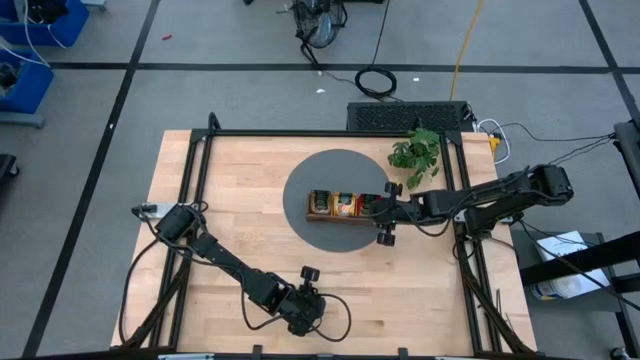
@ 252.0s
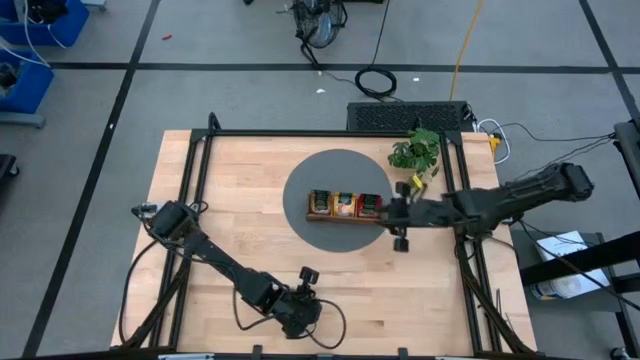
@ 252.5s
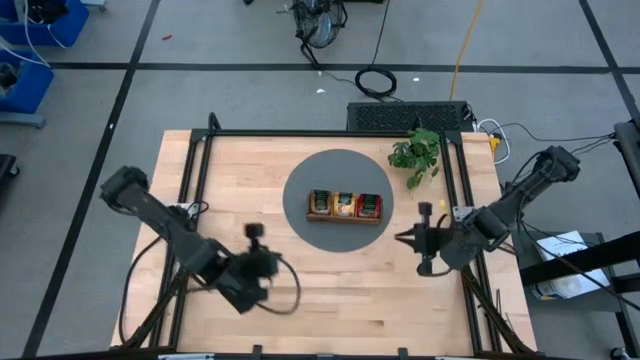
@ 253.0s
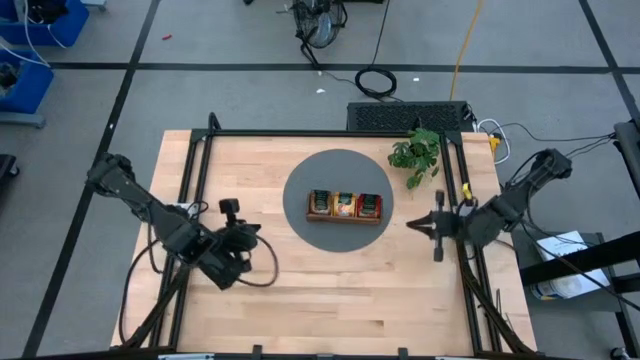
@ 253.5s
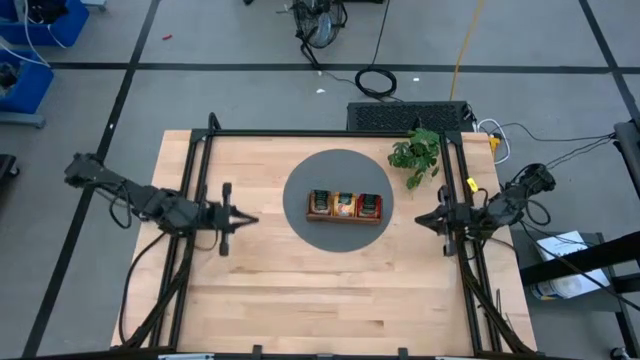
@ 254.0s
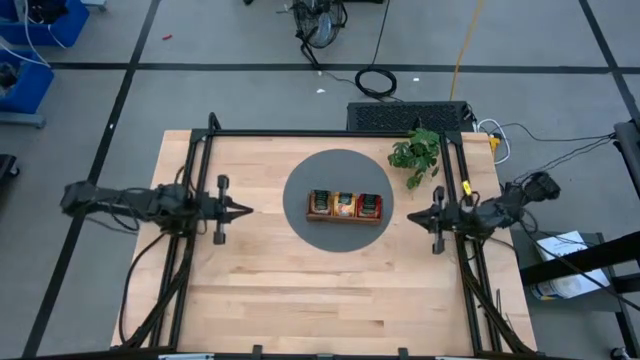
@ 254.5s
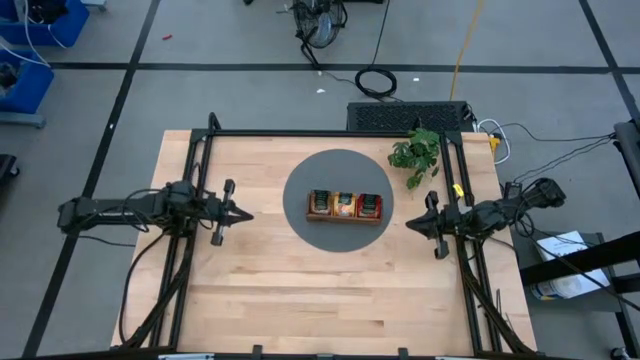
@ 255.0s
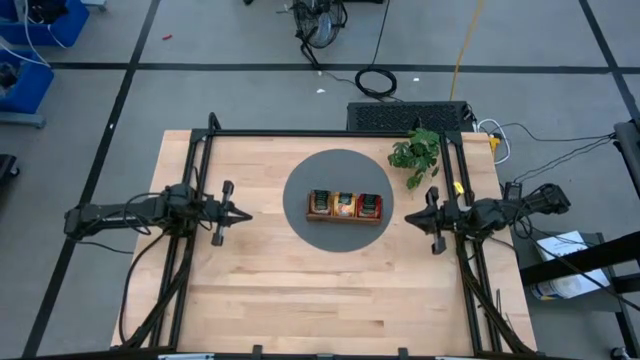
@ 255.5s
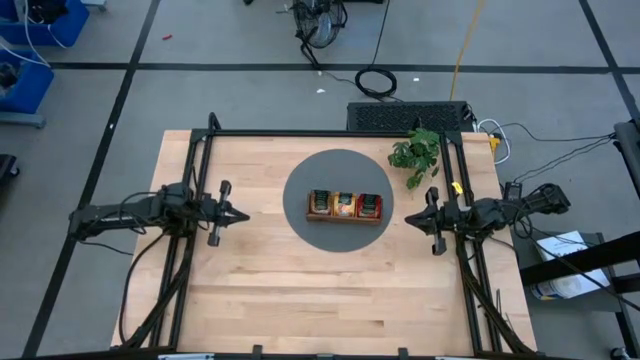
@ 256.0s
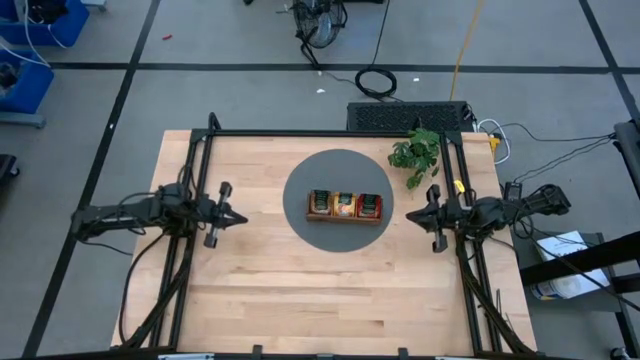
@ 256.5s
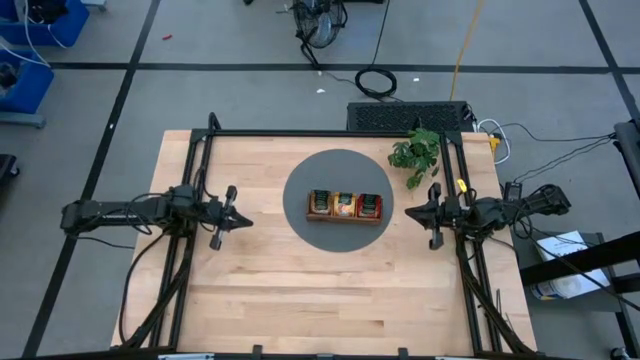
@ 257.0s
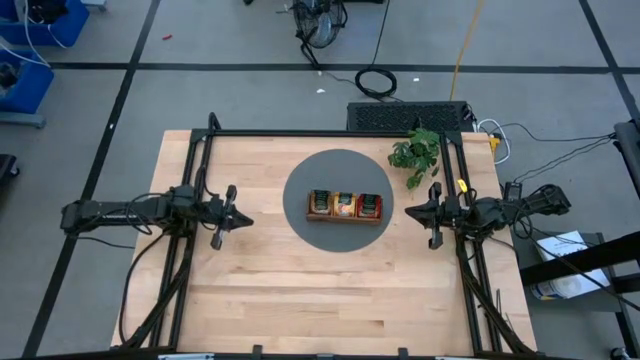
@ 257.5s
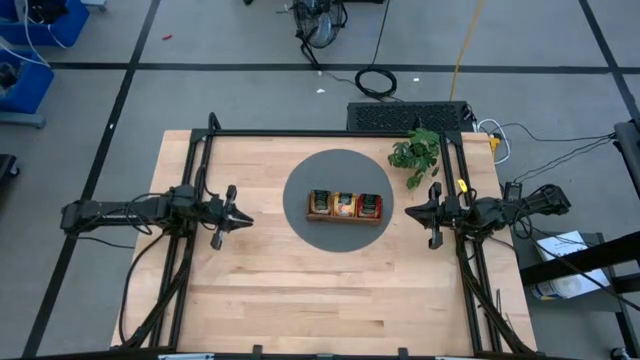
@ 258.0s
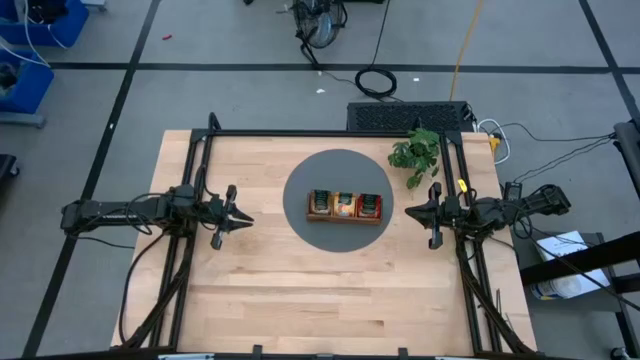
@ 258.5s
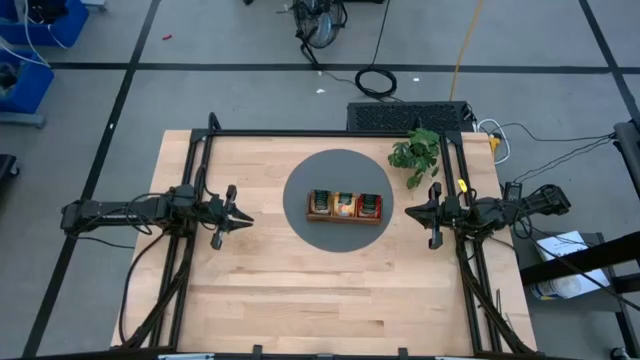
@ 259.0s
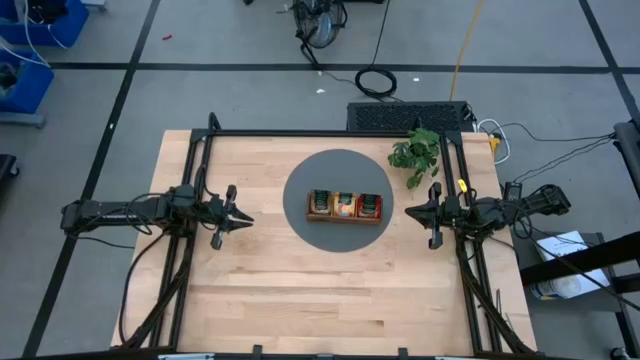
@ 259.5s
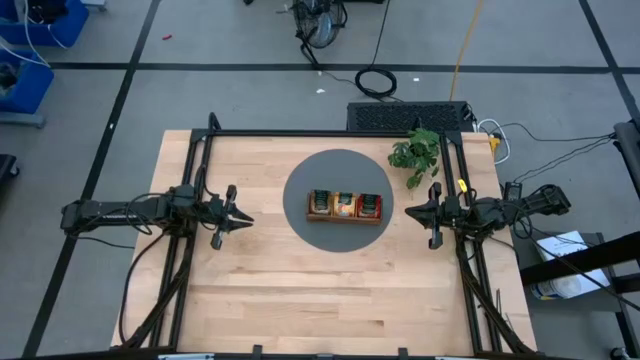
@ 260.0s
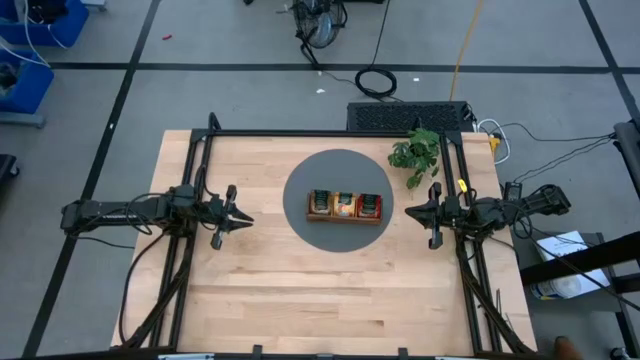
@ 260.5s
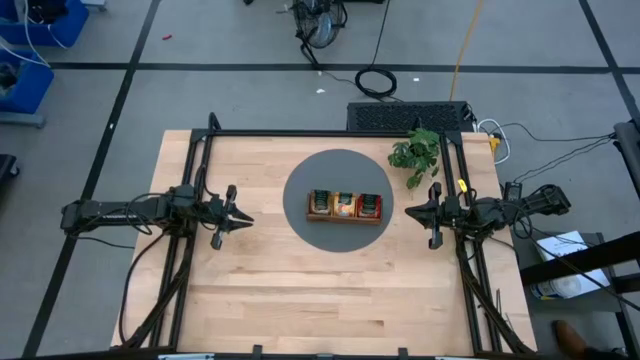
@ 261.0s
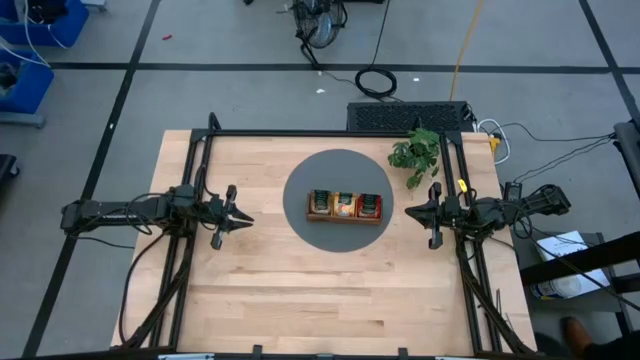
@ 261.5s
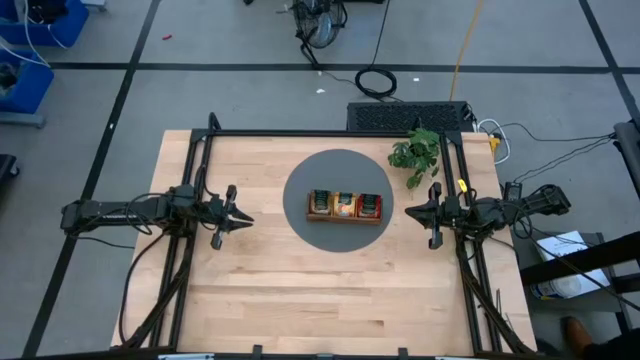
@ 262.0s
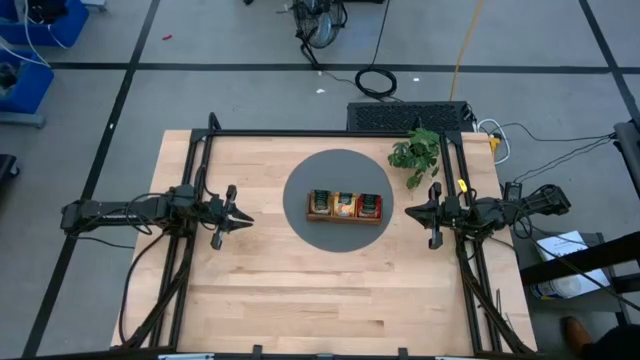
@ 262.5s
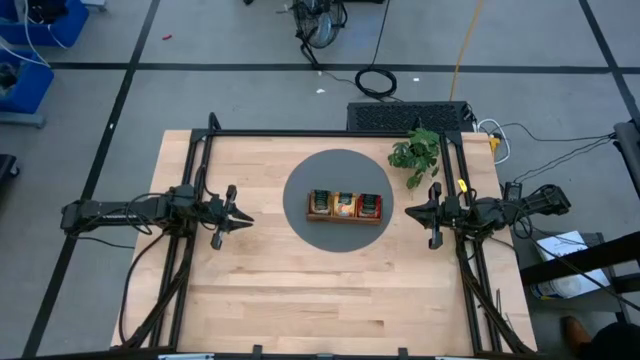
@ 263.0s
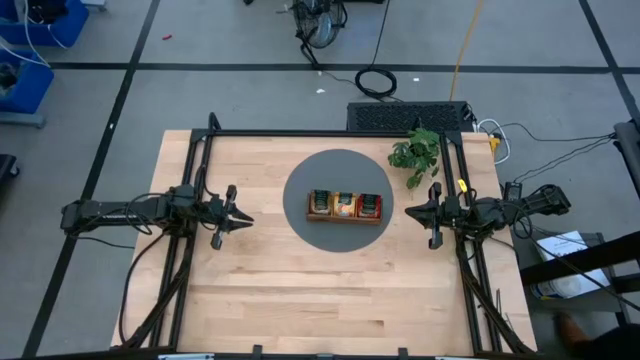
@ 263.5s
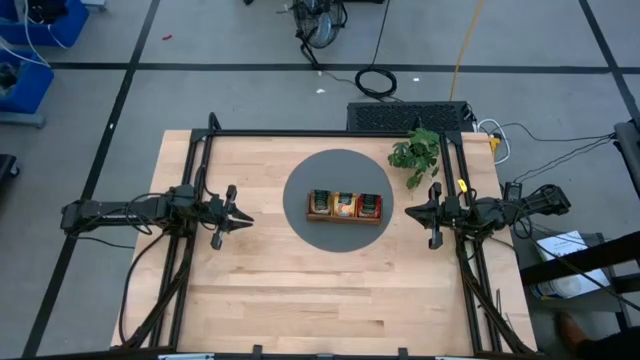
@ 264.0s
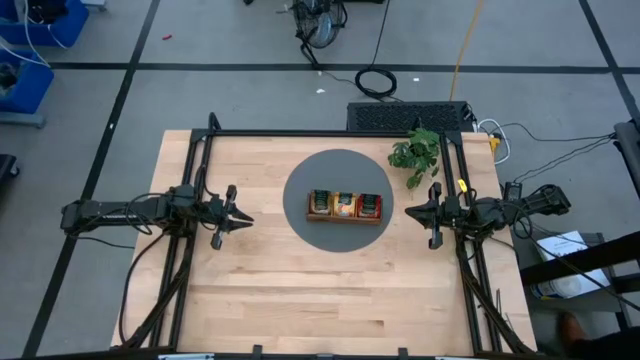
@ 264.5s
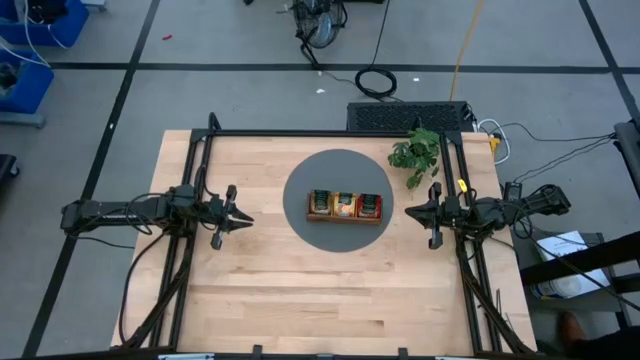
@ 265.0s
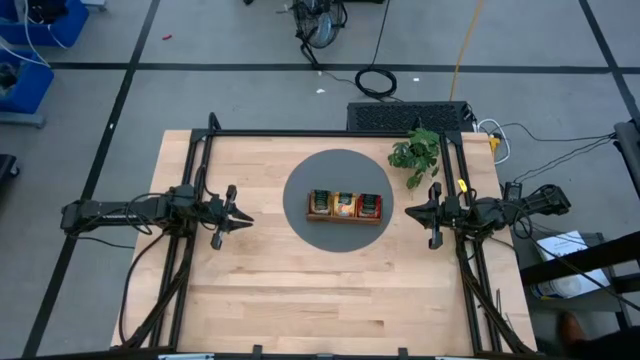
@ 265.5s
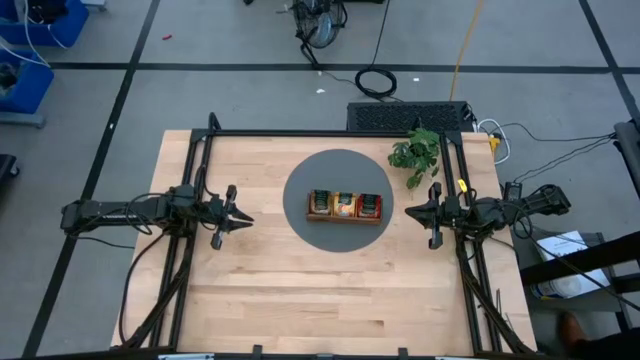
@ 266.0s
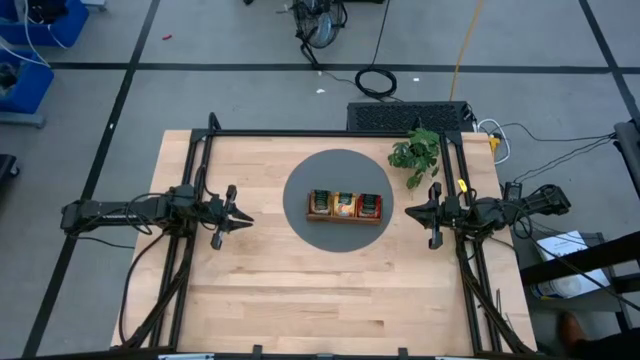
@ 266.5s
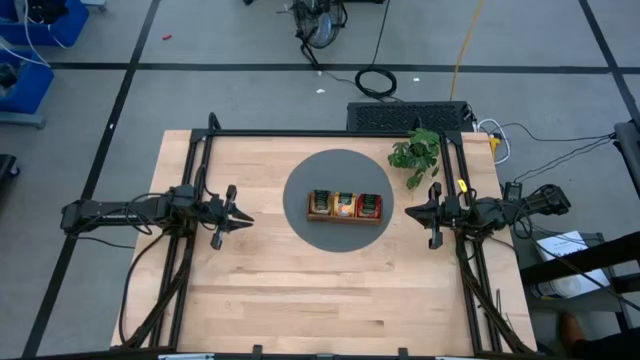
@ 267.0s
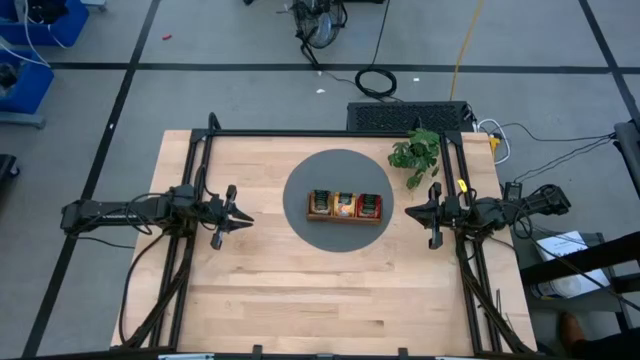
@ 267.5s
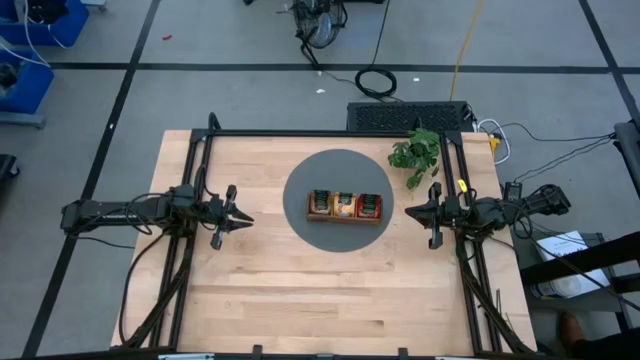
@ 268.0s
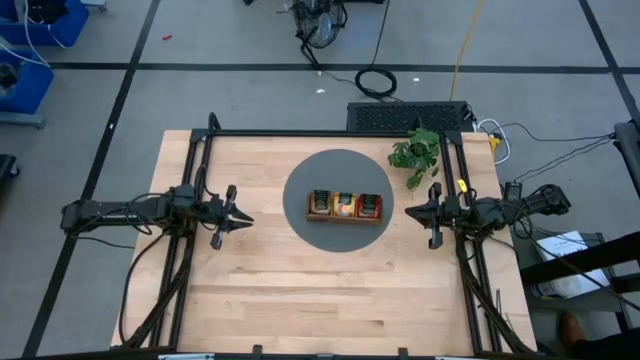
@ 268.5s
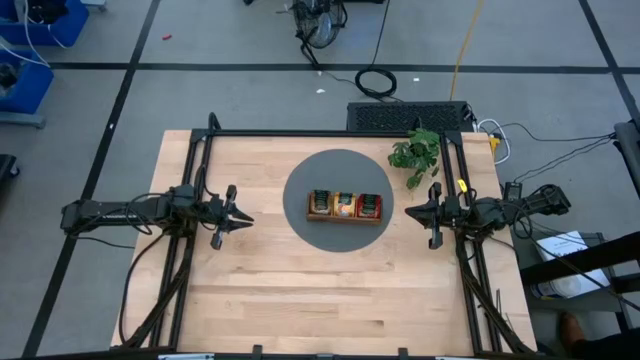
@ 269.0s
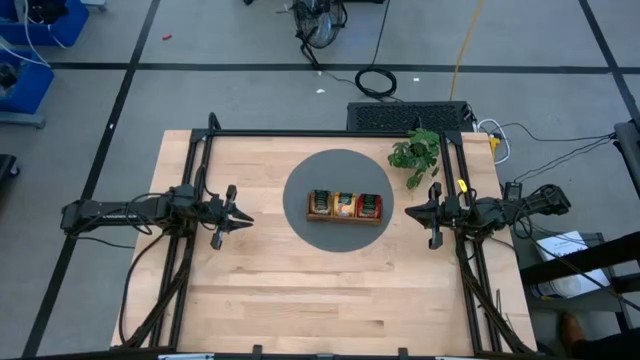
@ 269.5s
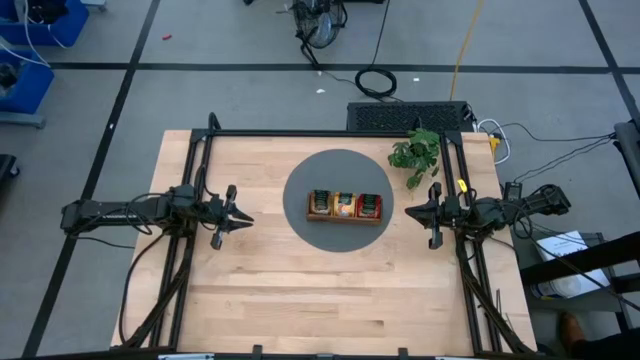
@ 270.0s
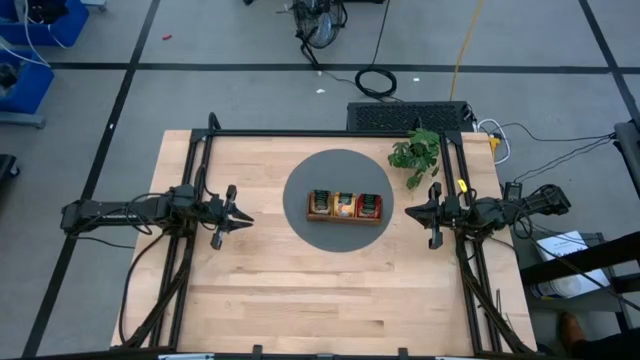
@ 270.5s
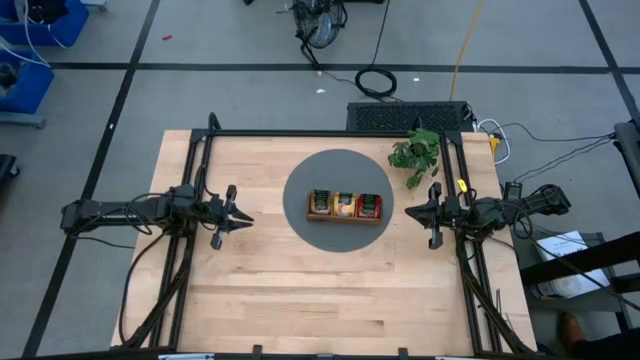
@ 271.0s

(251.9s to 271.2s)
Task: Pick & Place Tea
Return to Home Position

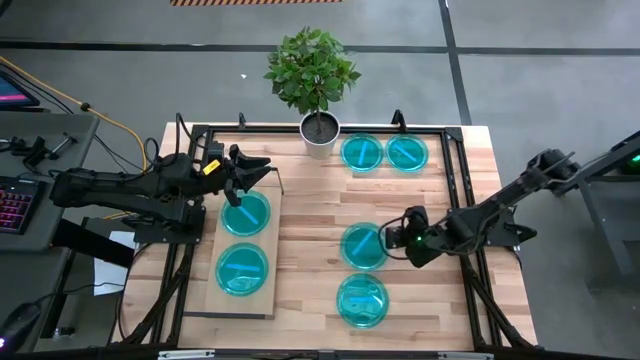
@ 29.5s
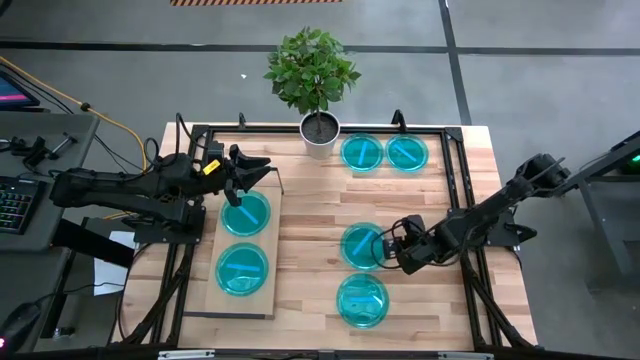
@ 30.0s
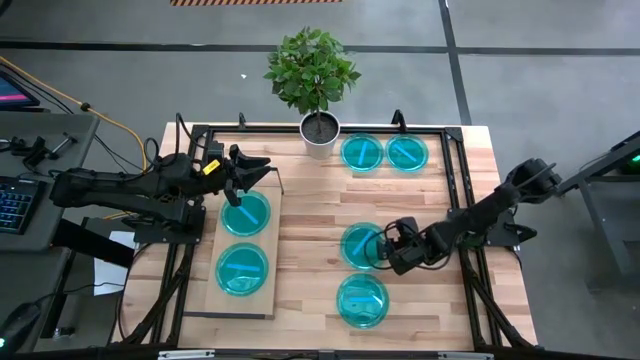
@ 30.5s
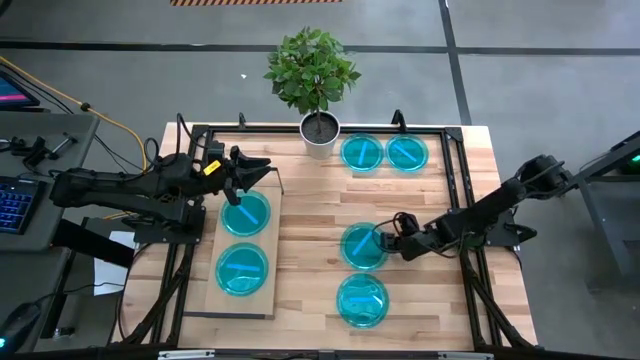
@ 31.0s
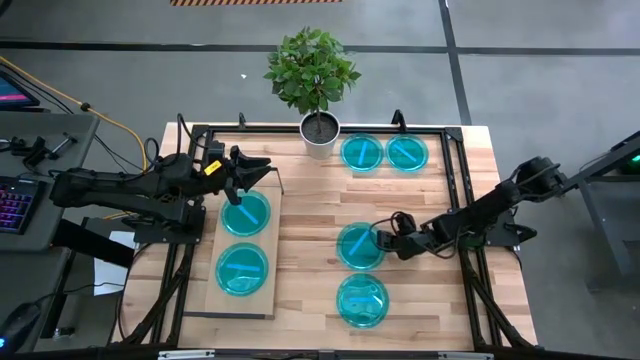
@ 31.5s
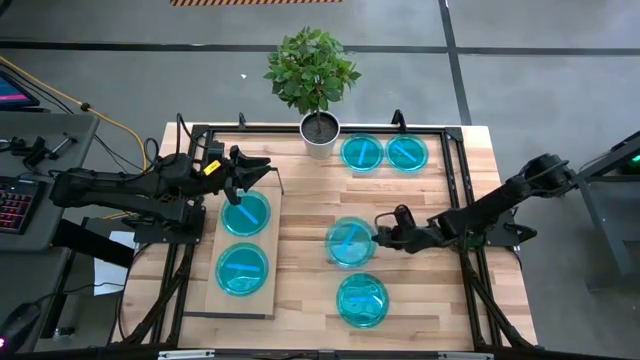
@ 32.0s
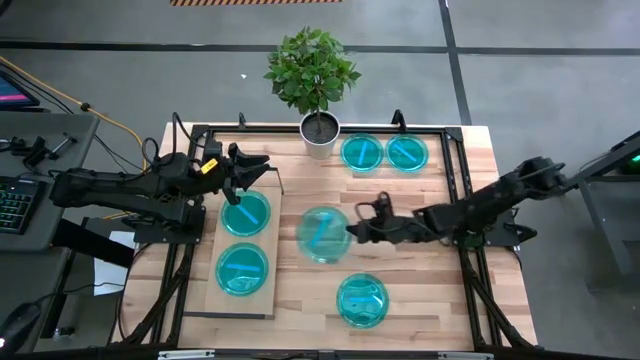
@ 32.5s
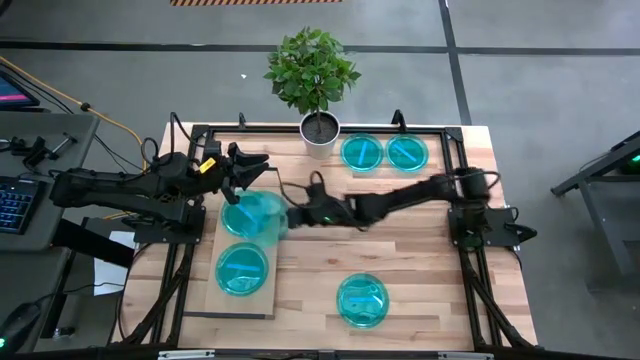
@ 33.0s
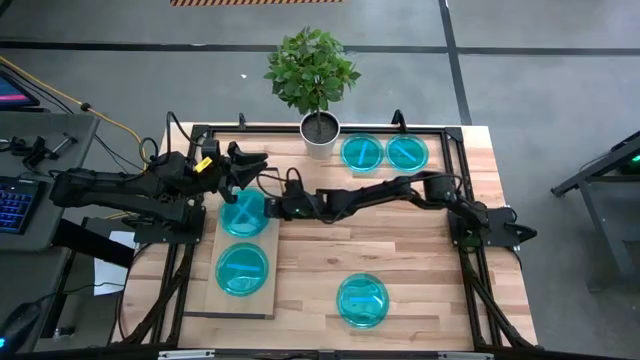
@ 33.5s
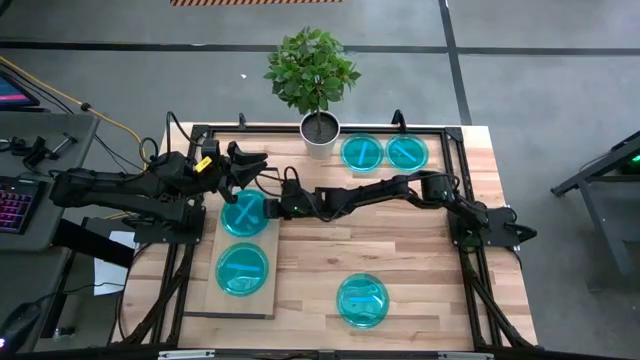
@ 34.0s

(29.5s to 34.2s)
Task: Place and stack plates onto a shelf
Stack the middle blue plate on the top blue plate on the shelf
